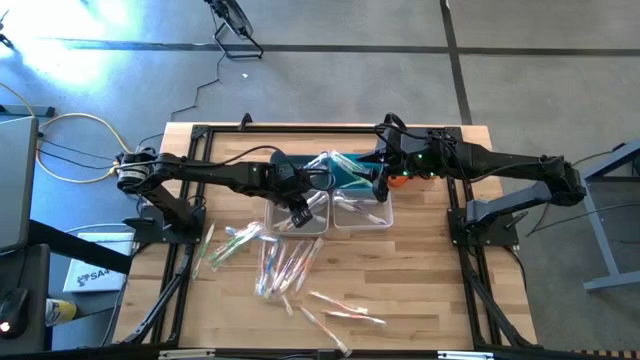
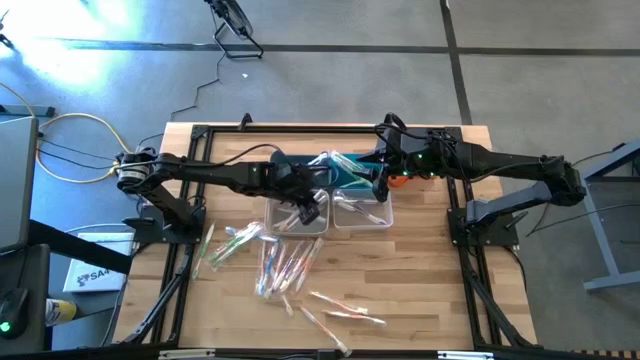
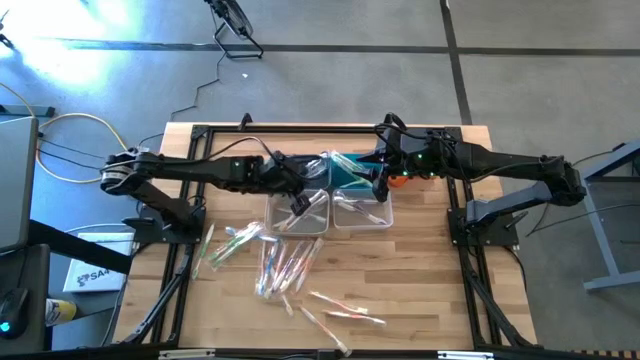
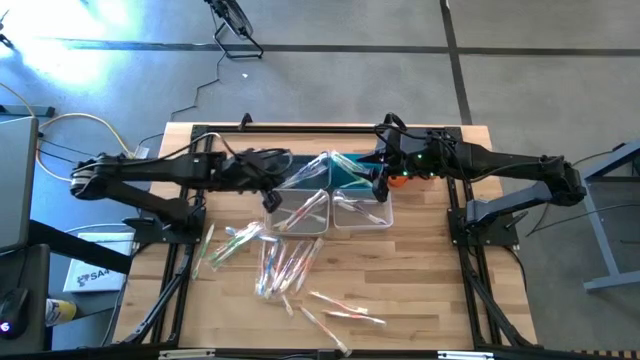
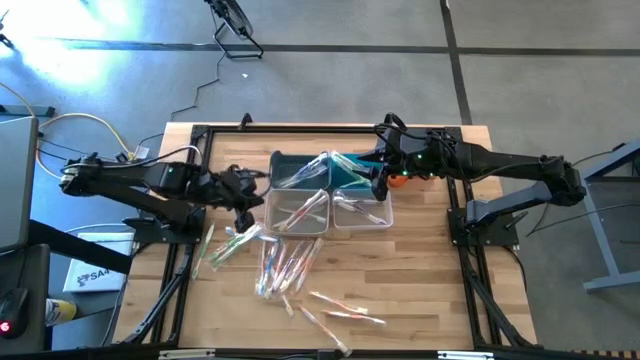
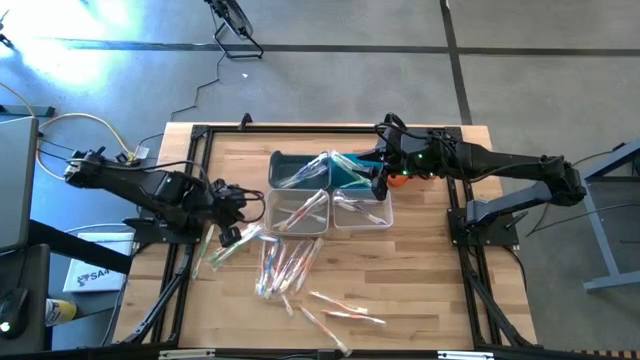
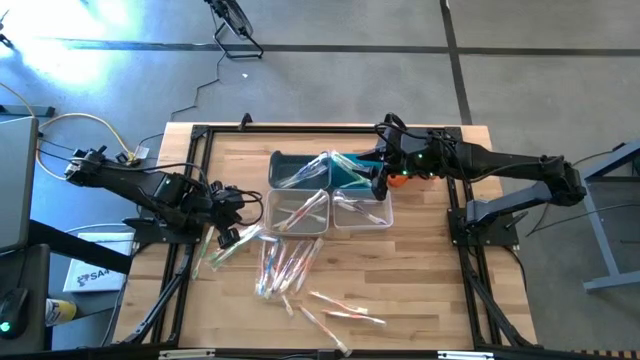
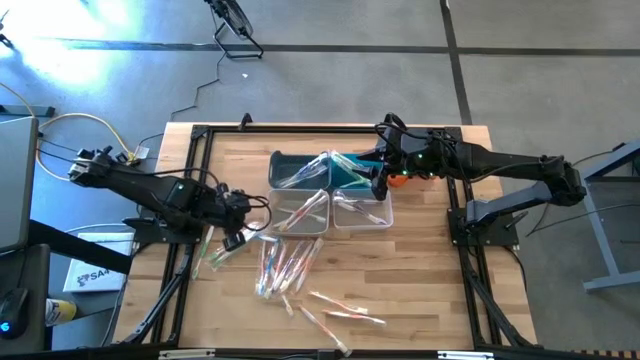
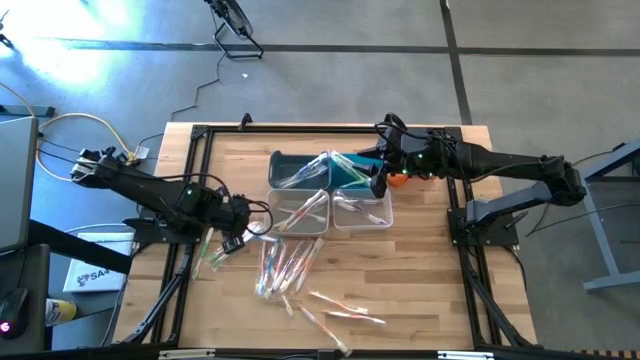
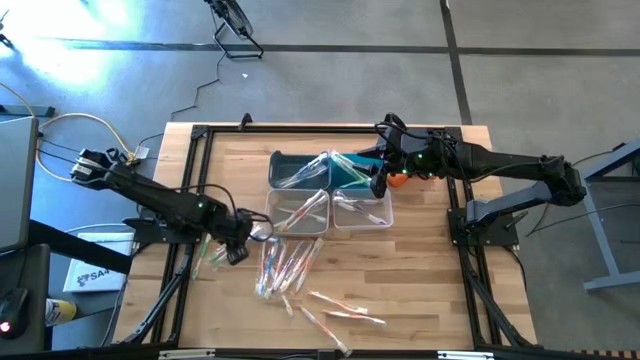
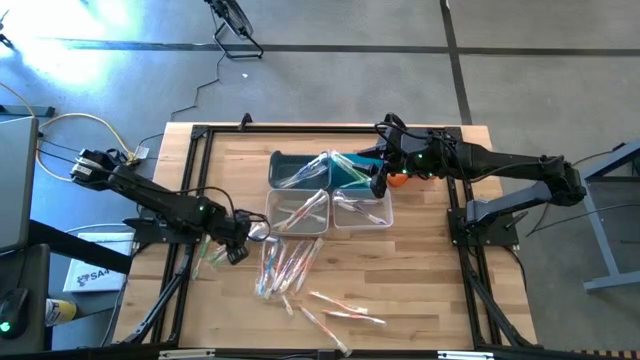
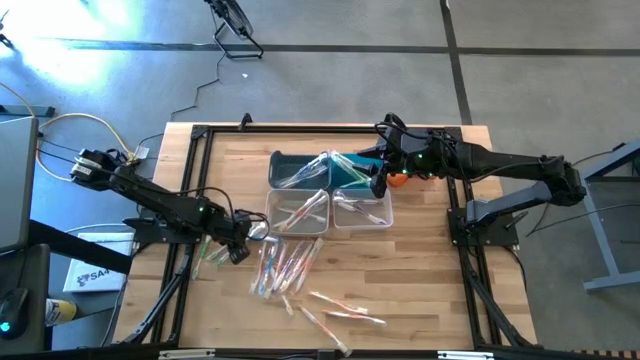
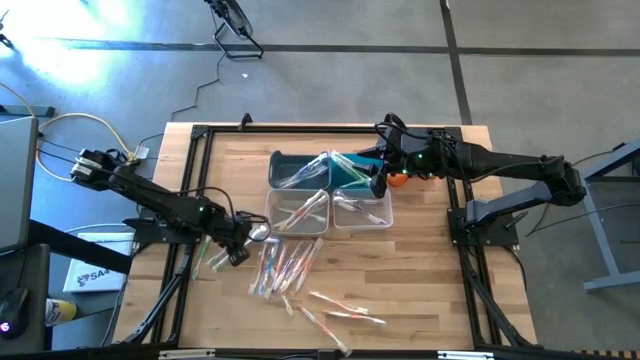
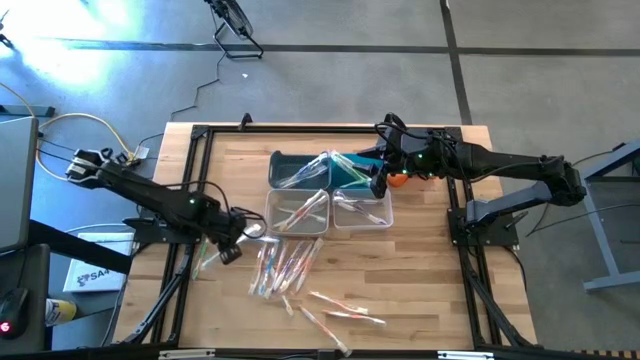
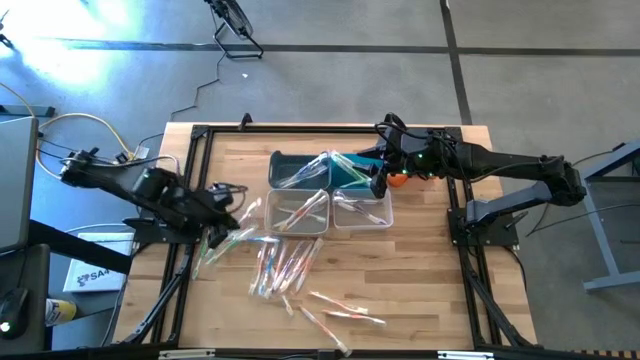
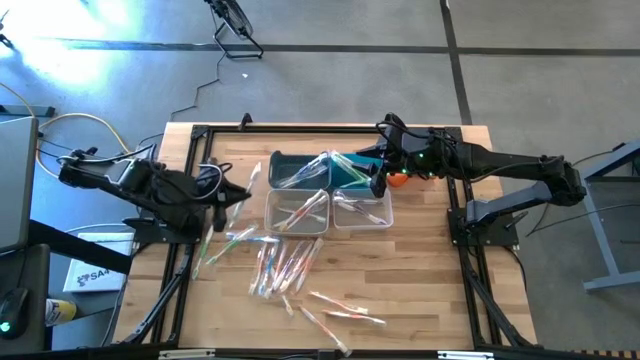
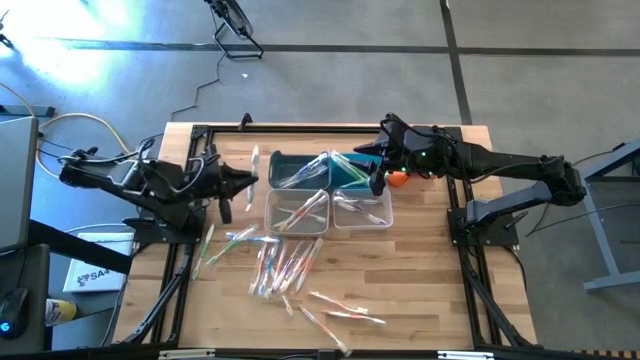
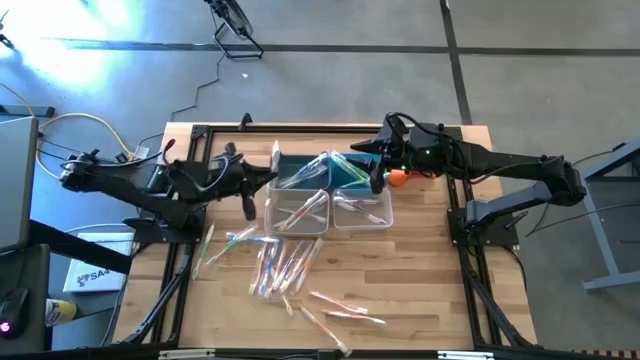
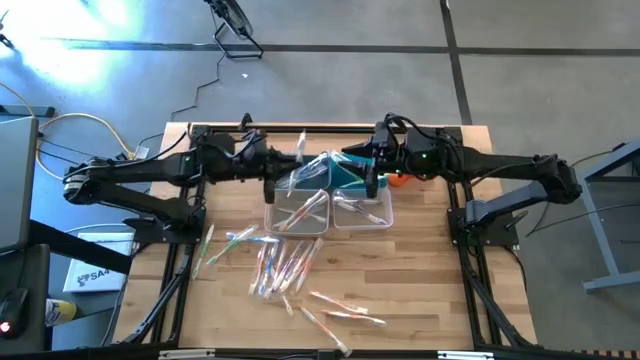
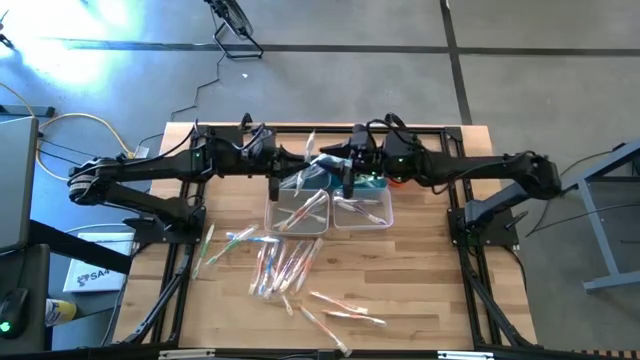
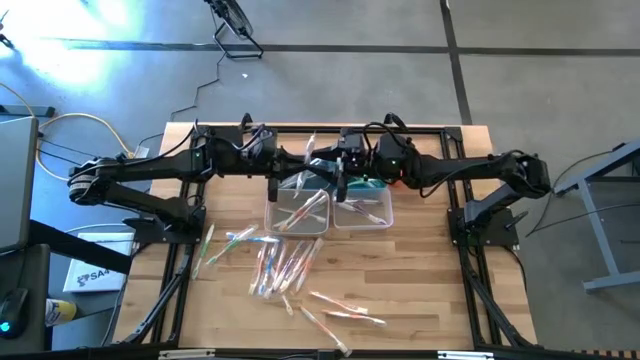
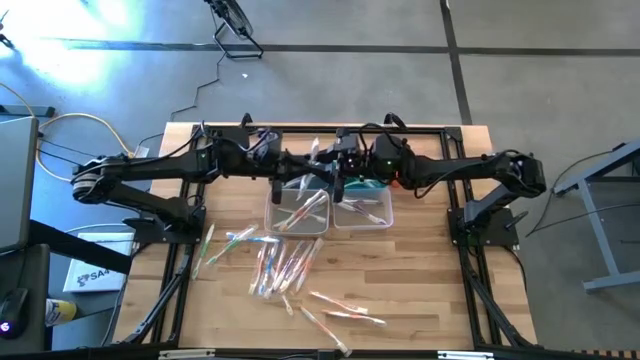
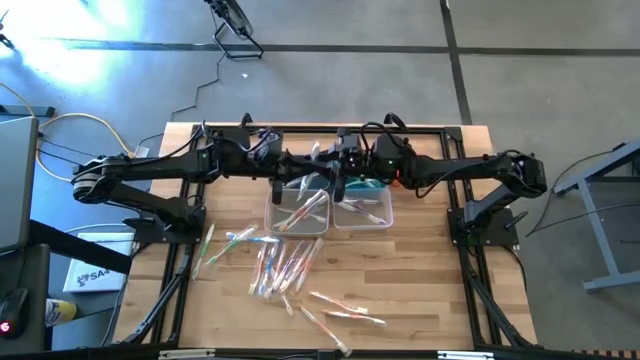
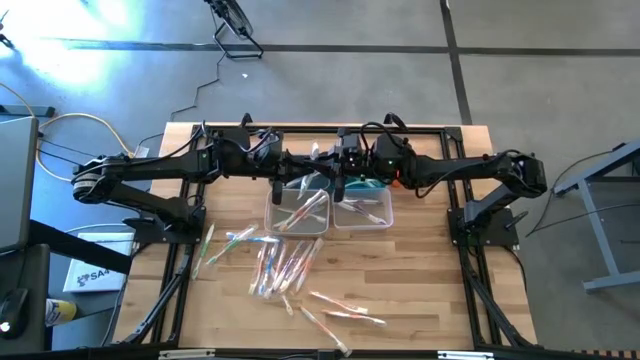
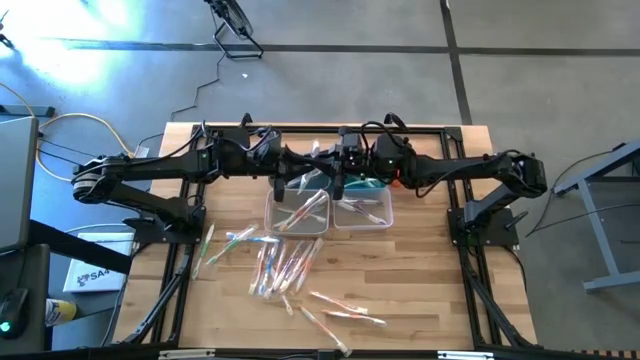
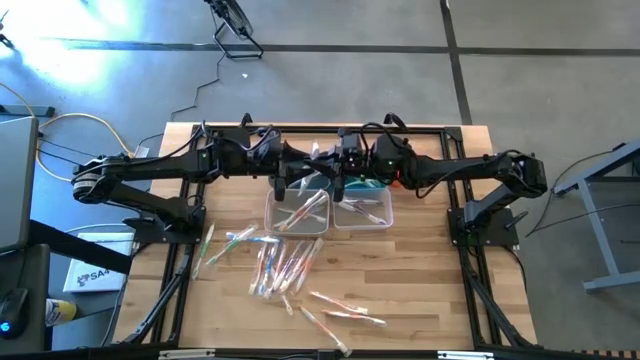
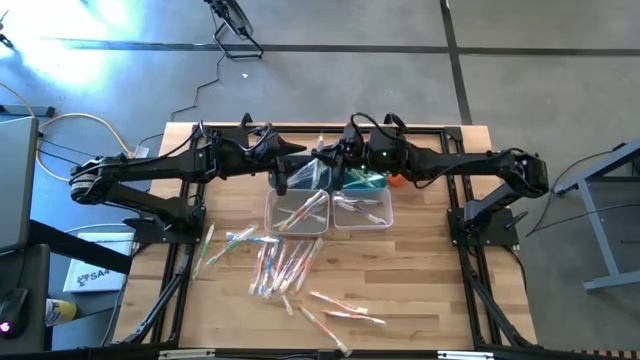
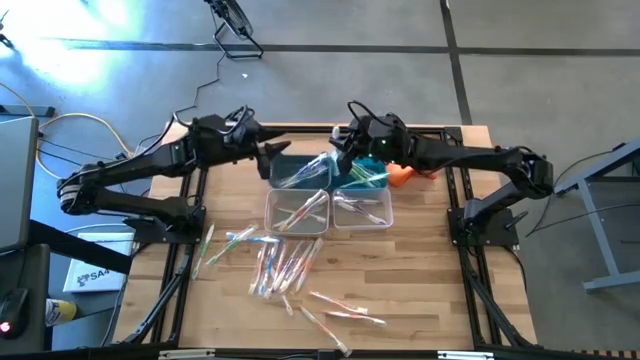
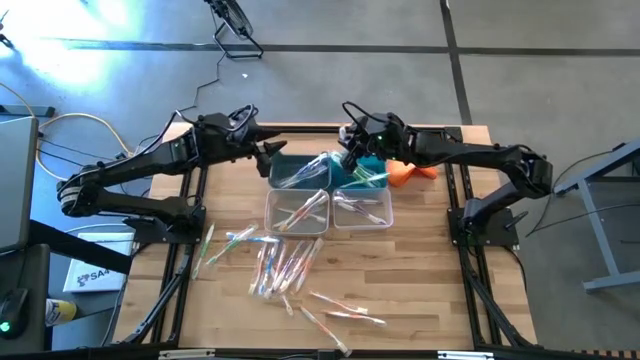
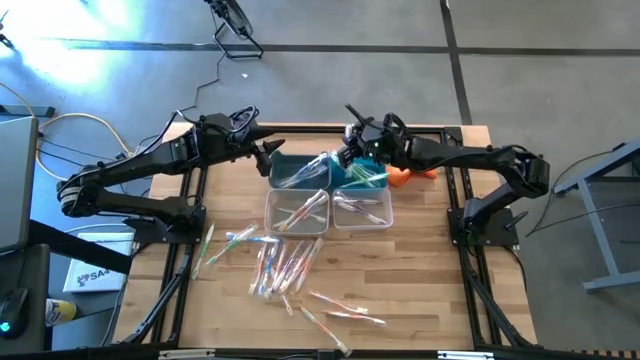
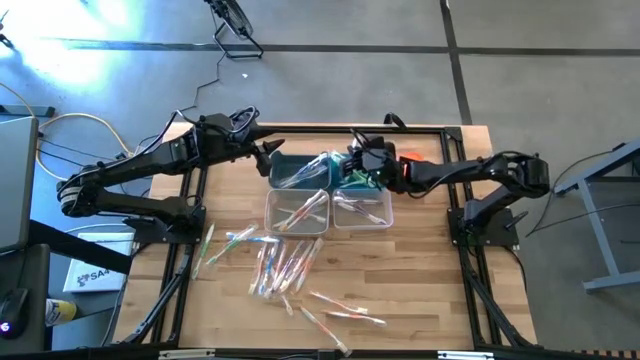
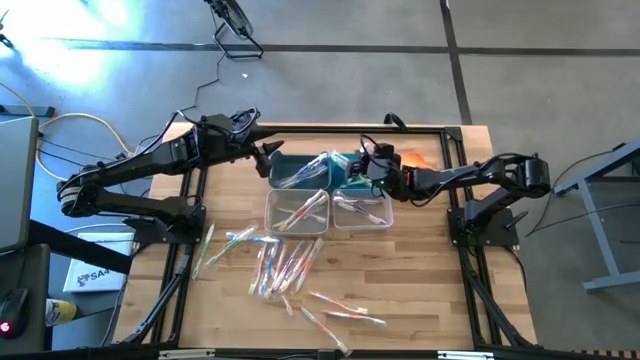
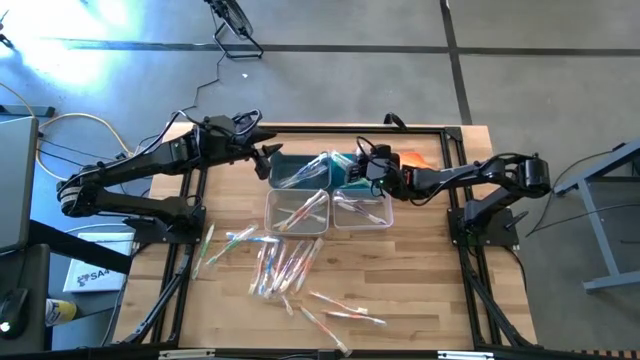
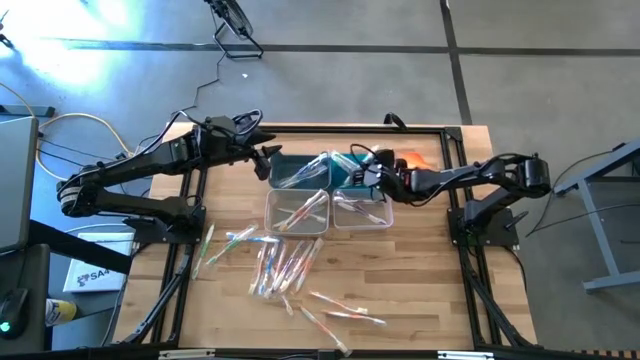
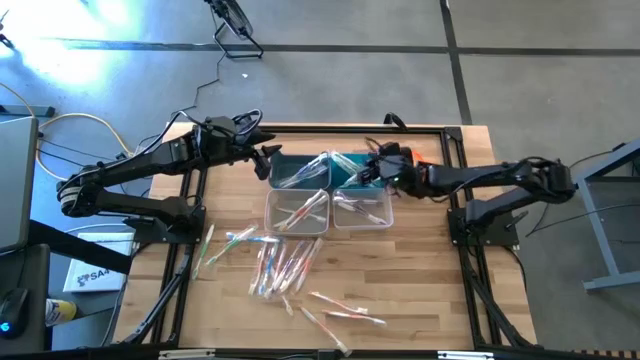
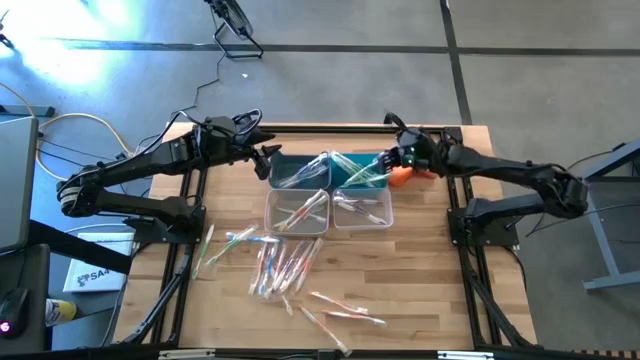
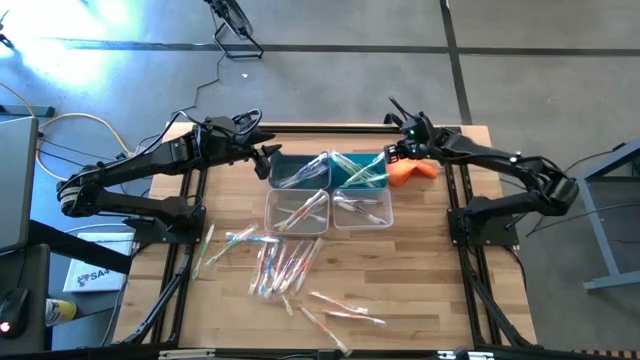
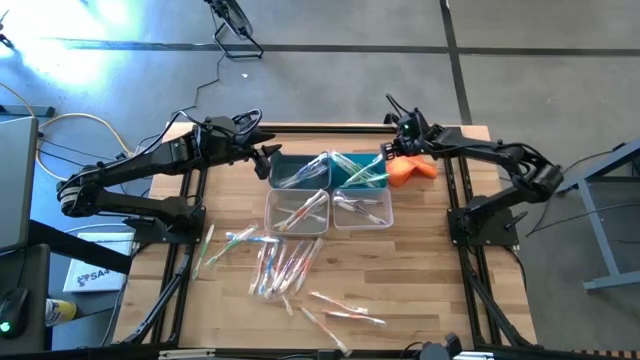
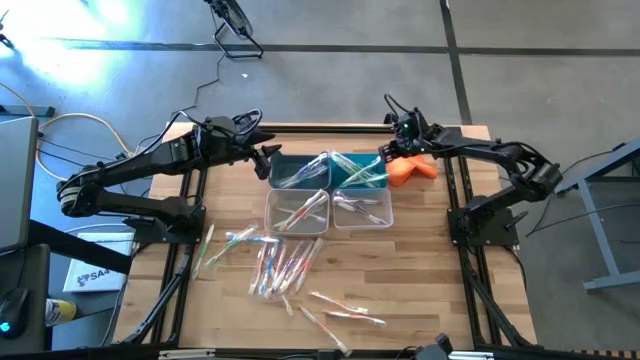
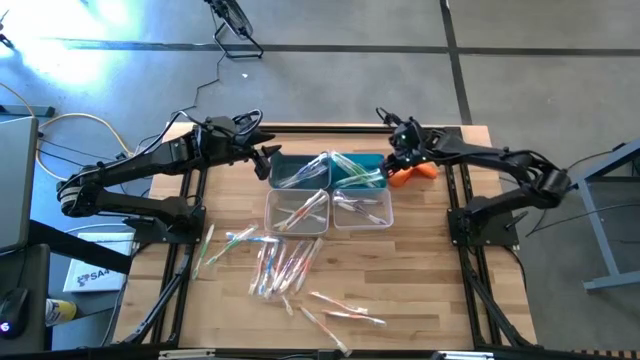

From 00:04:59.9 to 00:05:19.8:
Task: Pick & Place Toothbrushes
Put the green toothbrush into the blue bin
